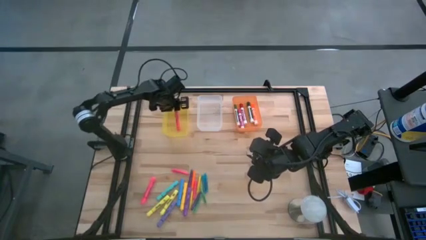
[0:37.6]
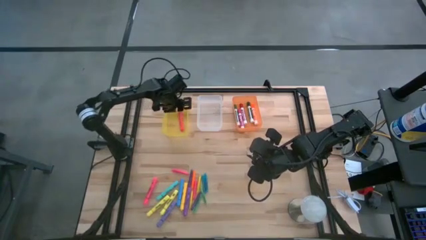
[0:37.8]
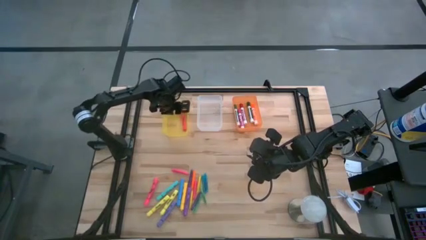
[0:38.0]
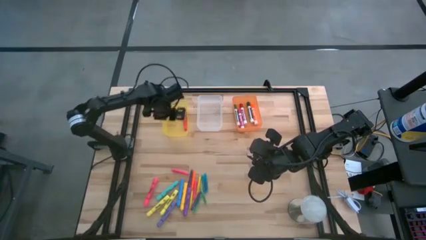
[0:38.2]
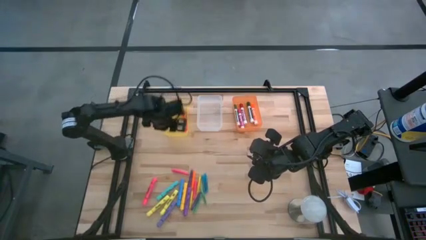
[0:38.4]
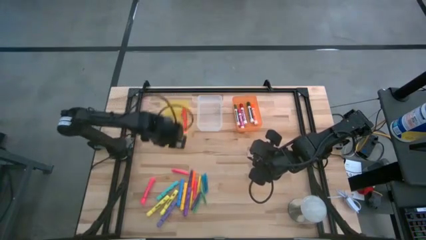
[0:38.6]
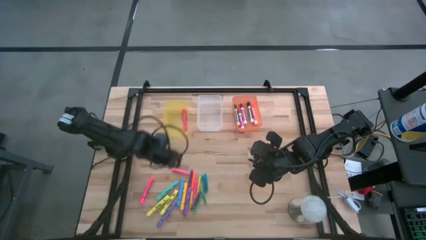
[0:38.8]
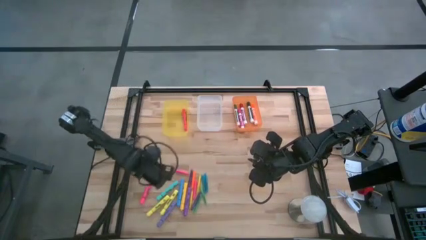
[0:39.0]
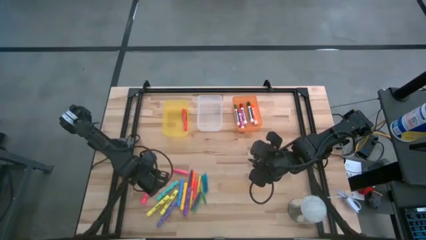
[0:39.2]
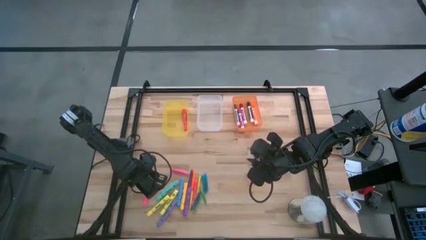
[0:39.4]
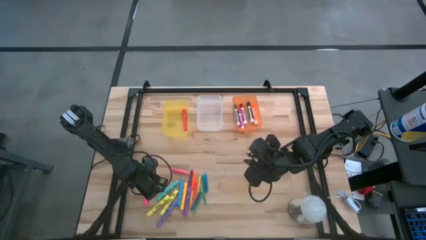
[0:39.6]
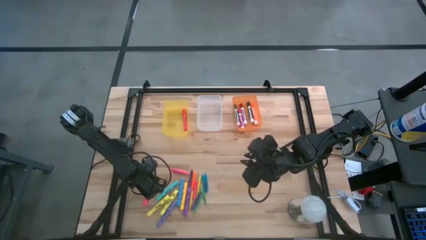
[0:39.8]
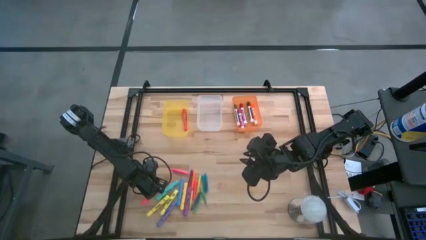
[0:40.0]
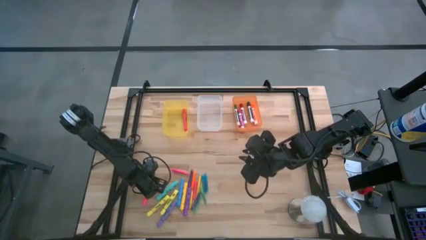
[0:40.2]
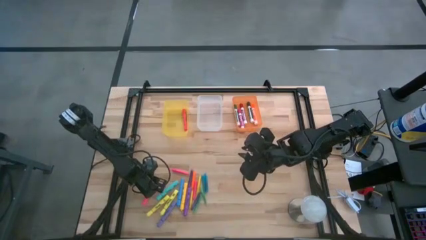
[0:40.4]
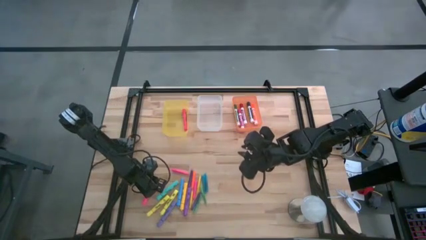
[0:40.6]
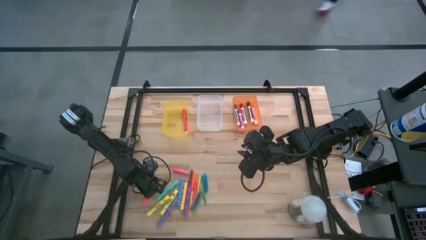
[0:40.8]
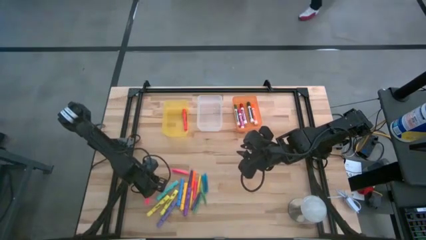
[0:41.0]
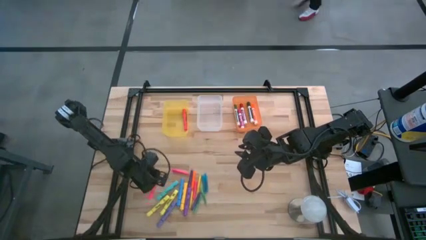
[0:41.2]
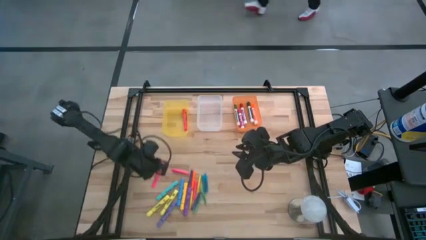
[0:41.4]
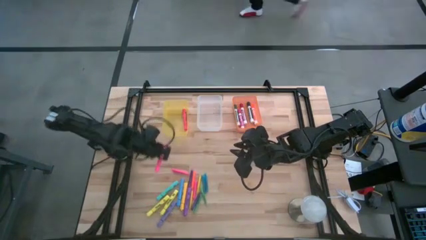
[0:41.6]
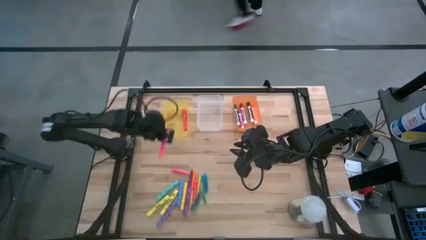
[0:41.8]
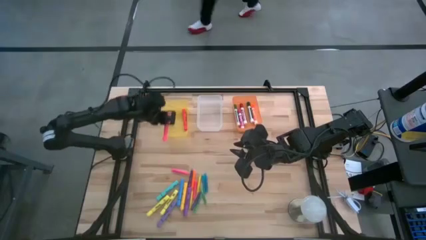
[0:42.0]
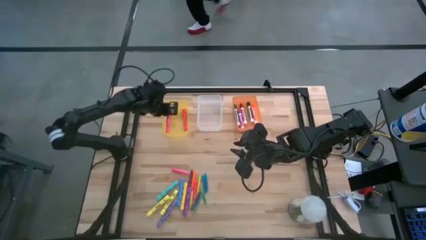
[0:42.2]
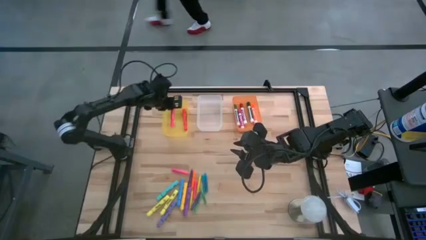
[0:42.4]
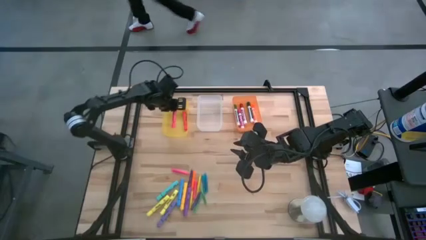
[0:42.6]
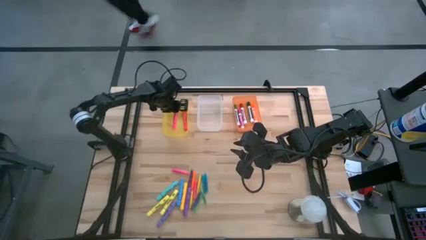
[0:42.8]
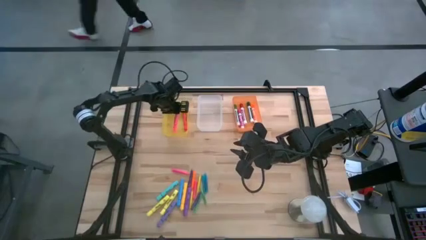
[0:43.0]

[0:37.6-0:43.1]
Task: Pick & Place Markers
Put the pink highlighter pen into the yellow bin

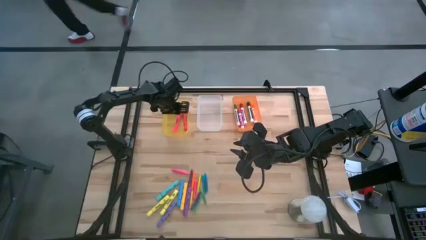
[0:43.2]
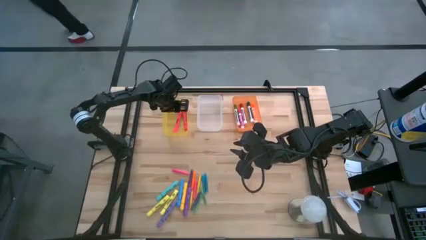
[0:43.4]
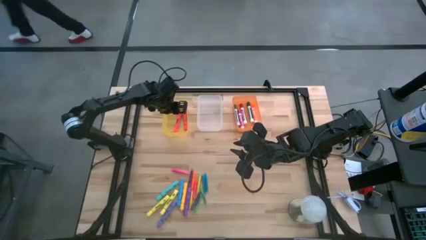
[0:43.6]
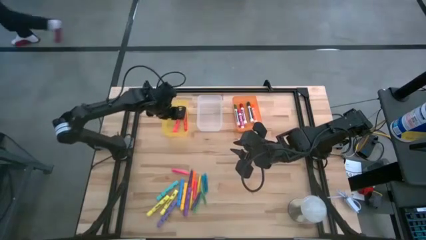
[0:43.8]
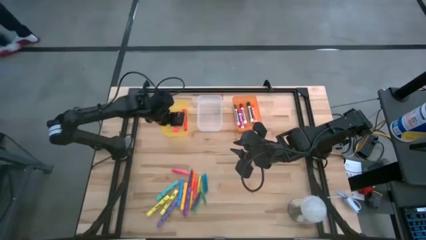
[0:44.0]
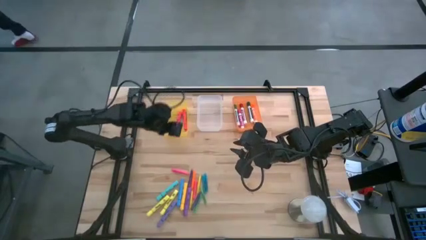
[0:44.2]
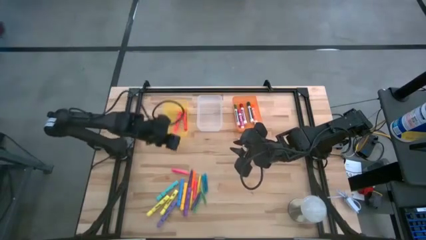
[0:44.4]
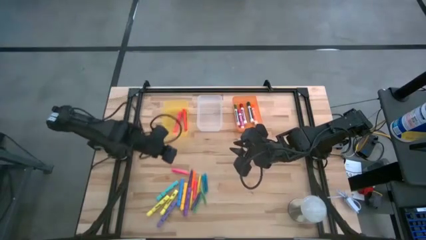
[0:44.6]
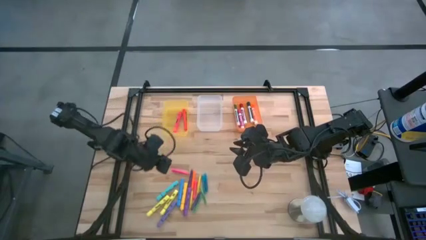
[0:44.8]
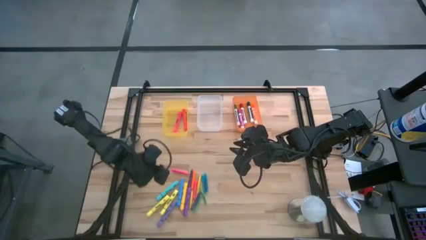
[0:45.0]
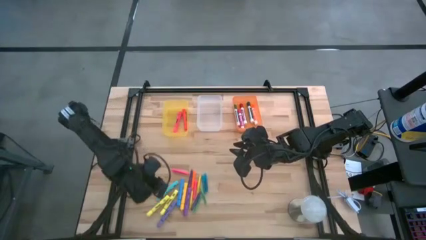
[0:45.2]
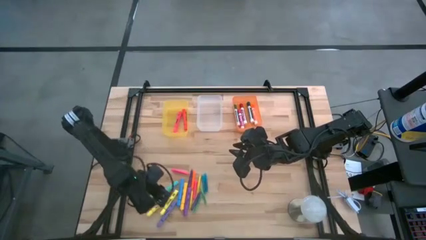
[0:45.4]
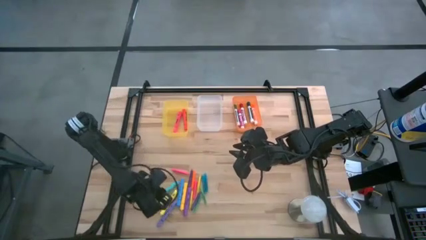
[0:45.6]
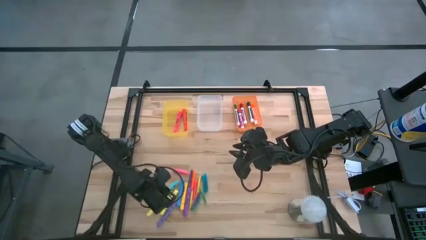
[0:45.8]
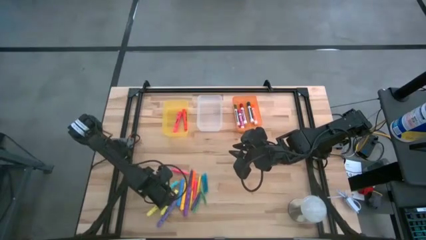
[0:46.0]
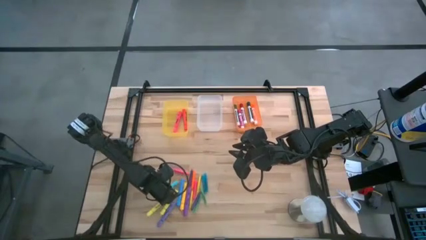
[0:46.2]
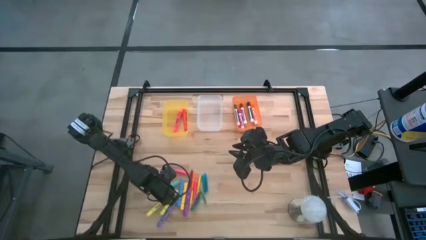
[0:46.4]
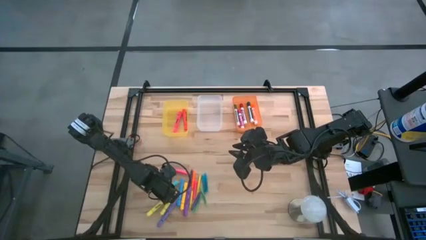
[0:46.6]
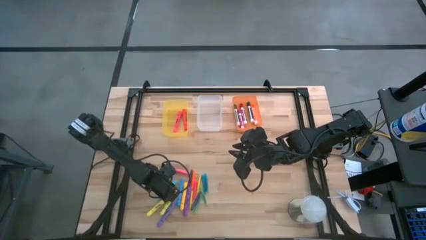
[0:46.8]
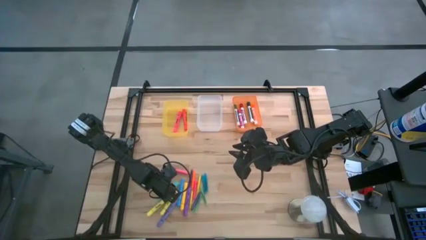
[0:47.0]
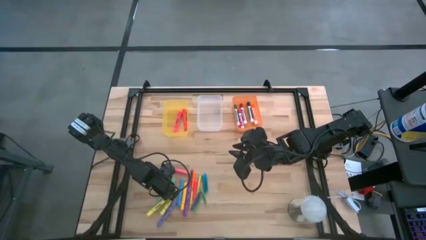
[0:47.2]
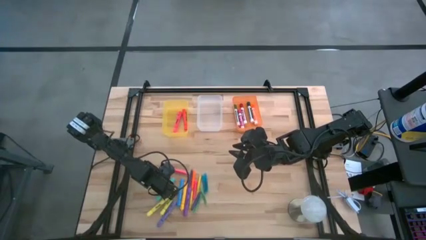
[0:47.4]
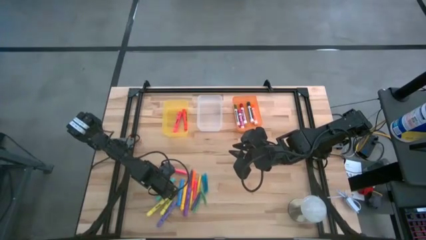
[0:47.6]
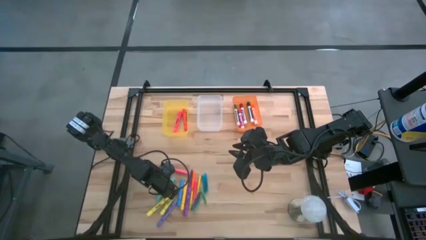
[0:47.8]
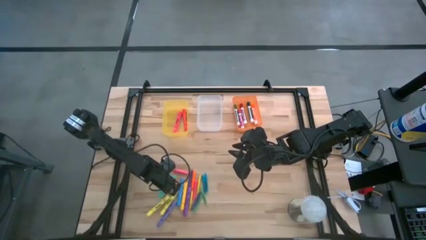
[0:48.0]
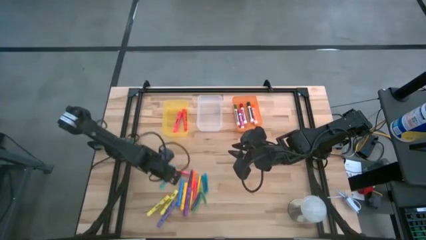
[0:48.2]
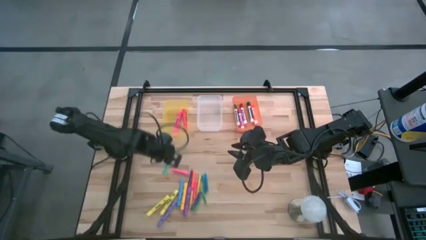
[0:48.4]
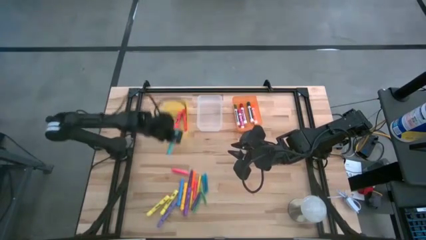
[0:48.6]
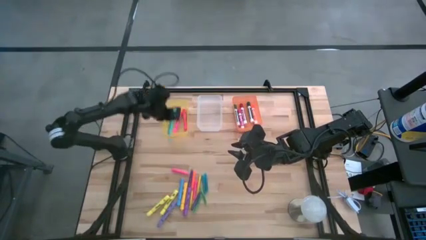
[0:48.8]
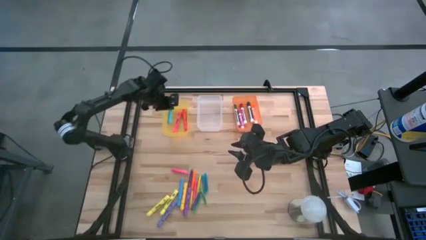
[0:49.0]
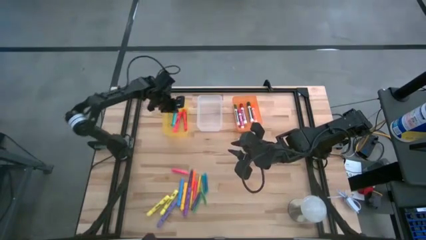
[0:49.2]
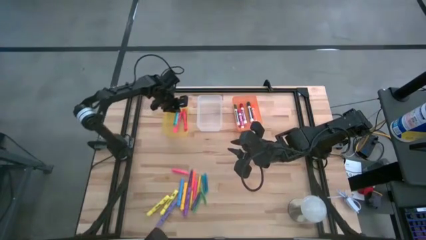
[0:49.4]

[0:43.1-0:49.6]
Put the light blue highlighter pen into the yellow bin

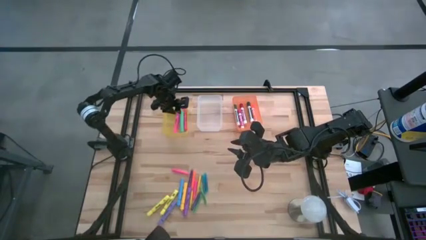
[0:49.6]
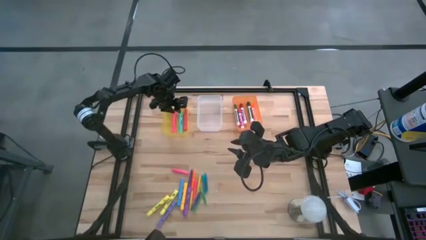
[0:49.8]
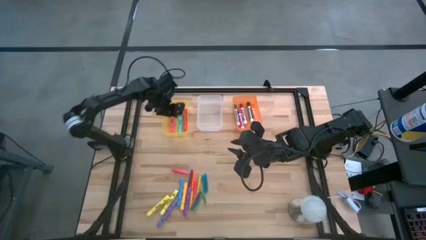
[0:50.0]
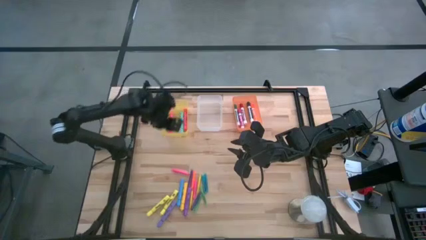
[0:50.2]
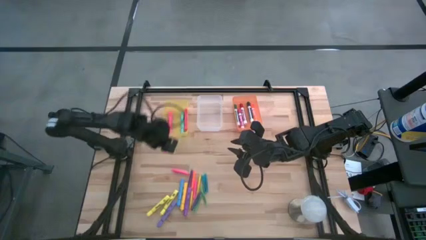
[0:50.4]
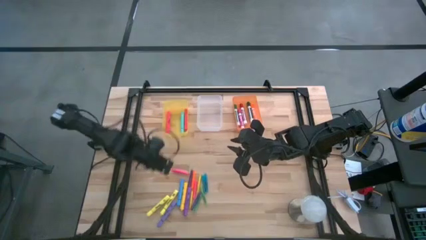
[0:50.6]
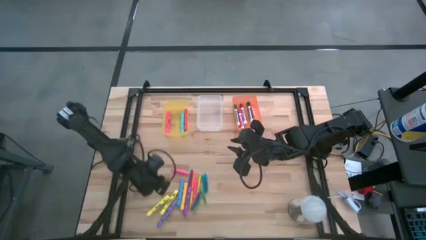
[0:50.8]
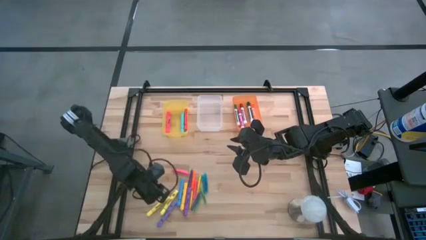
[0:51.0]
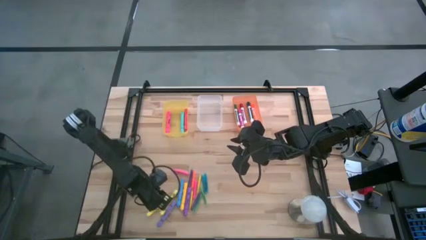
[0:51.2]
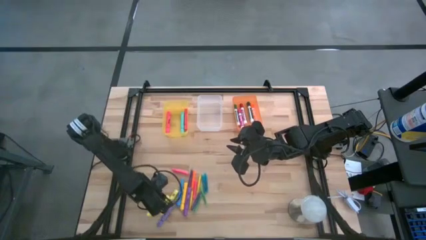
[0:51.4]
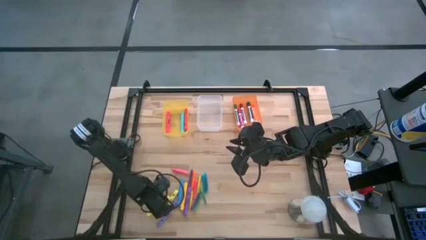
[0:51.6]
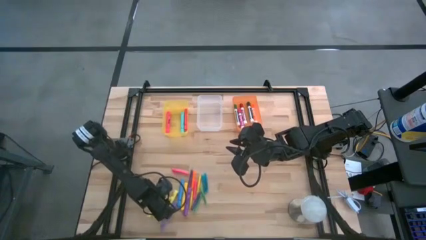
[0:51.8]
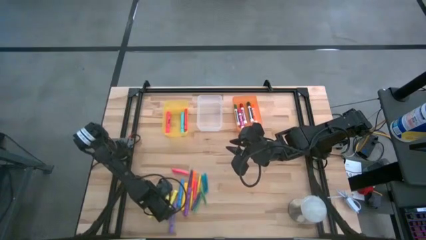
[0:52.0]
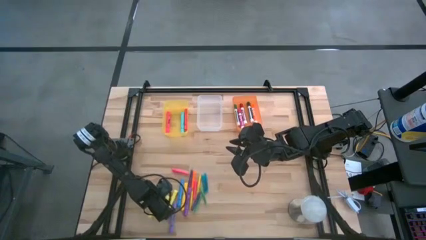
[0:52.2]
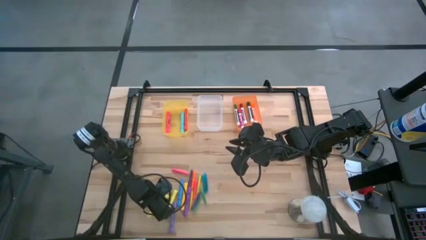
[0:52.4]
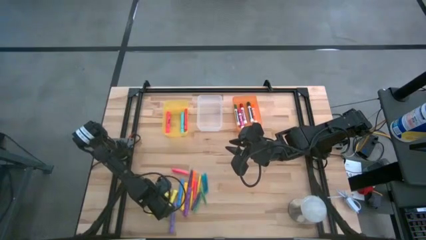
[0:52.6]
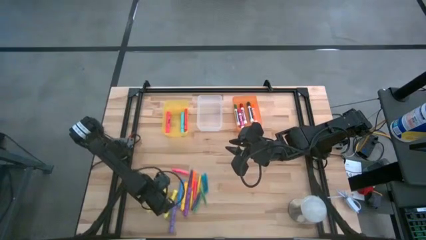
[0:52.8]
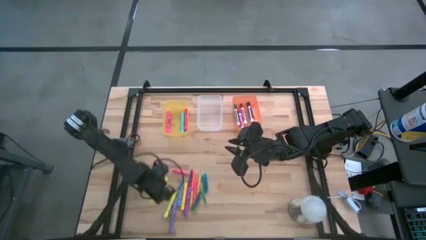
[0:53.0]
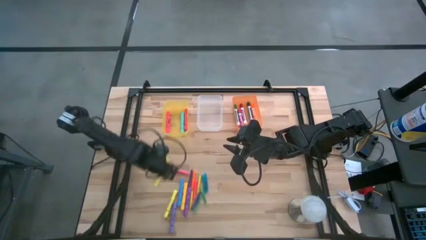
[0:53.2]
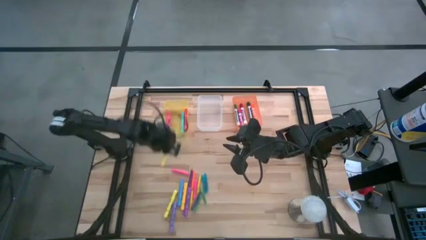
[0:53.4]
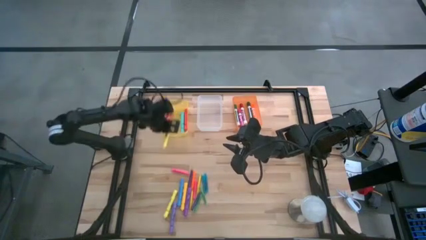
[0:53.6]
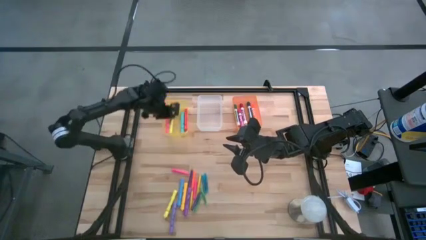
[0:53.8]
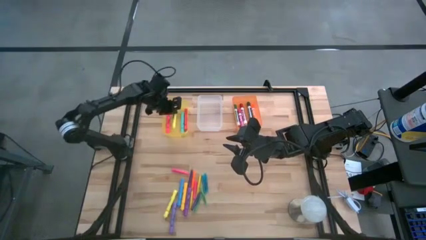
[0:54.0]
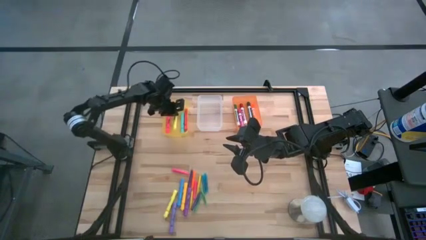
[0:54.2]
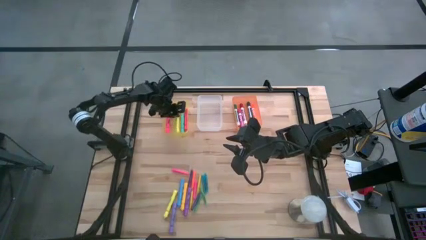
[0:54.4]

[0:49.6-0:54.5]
Put the left light yellow highlighter pen into the yellow bin
